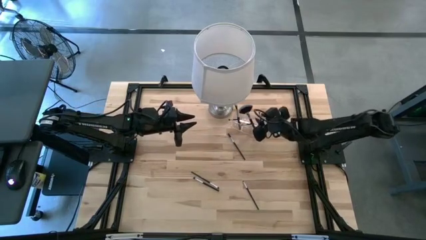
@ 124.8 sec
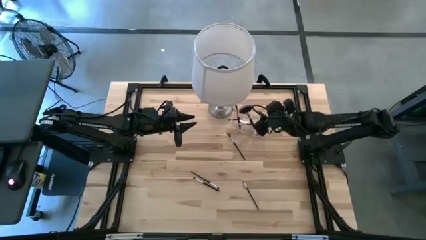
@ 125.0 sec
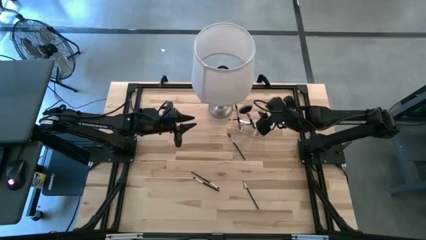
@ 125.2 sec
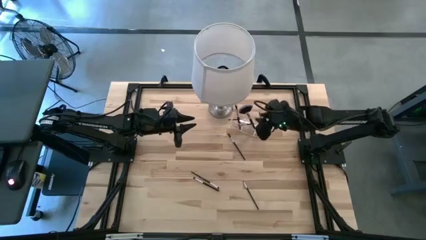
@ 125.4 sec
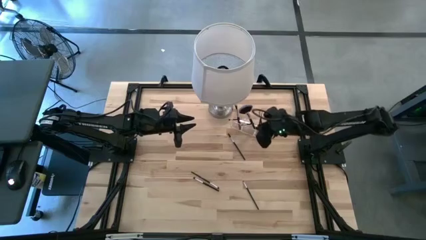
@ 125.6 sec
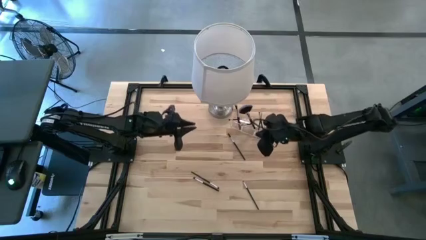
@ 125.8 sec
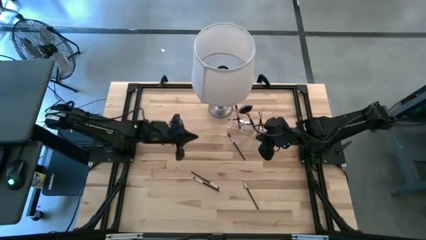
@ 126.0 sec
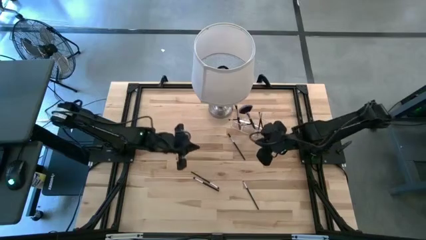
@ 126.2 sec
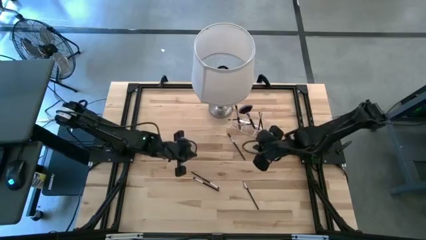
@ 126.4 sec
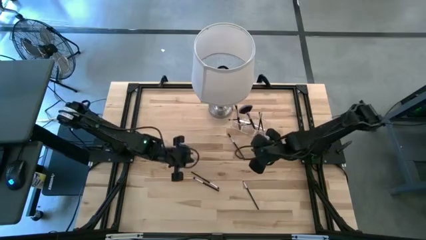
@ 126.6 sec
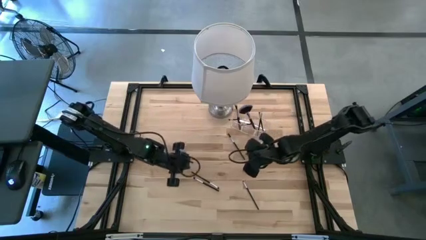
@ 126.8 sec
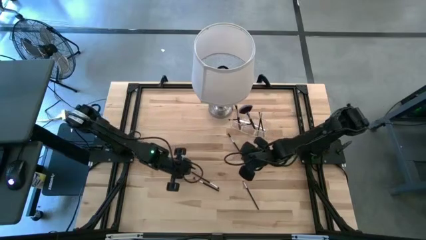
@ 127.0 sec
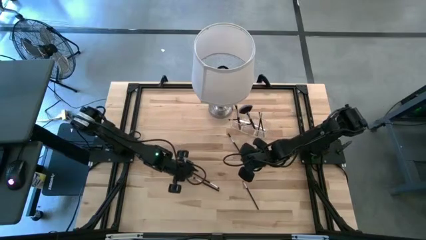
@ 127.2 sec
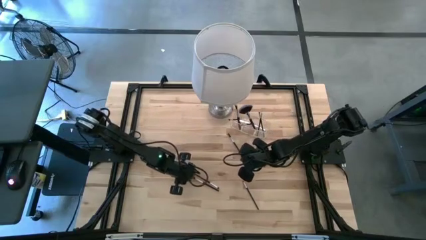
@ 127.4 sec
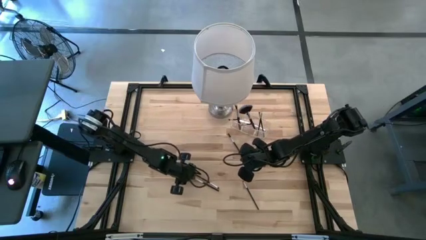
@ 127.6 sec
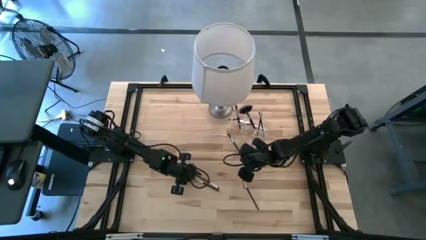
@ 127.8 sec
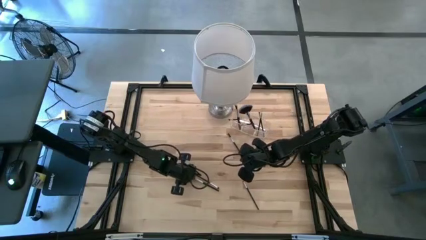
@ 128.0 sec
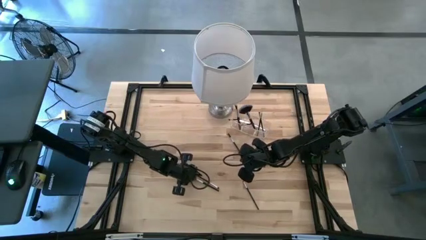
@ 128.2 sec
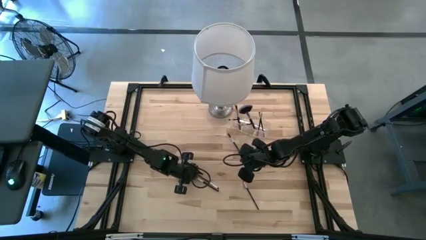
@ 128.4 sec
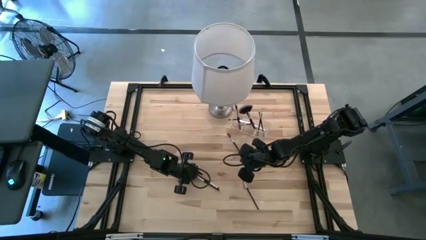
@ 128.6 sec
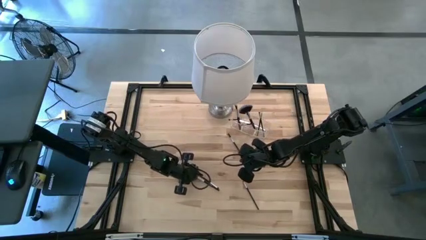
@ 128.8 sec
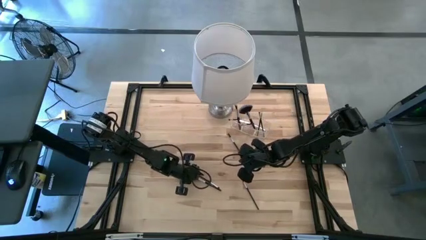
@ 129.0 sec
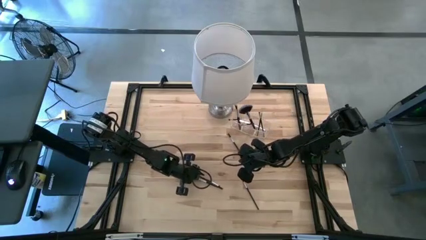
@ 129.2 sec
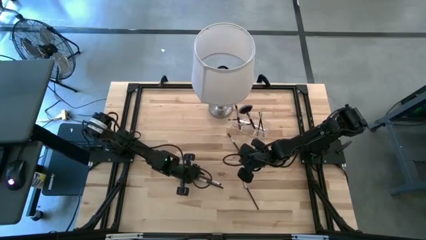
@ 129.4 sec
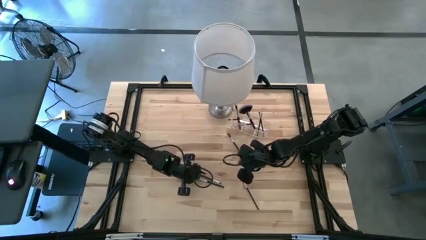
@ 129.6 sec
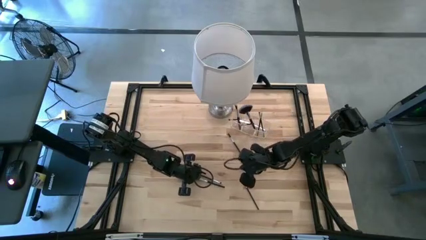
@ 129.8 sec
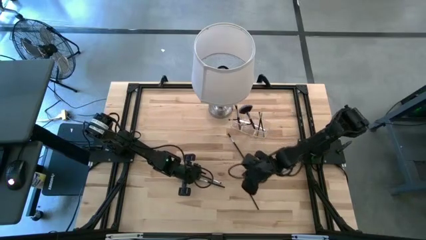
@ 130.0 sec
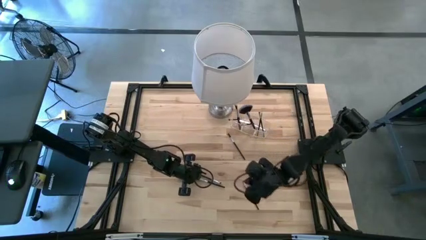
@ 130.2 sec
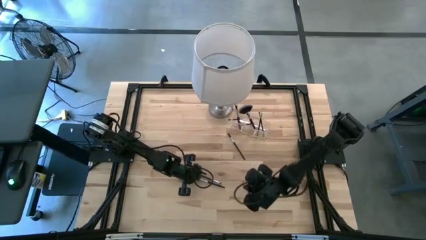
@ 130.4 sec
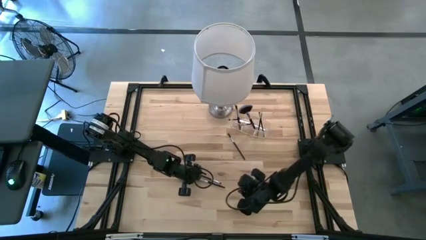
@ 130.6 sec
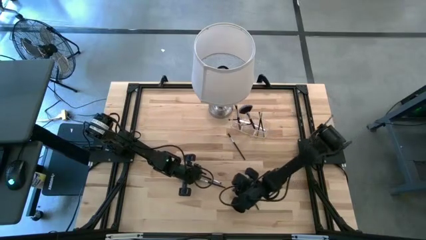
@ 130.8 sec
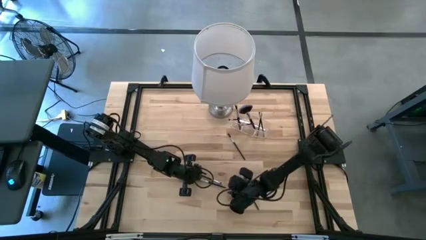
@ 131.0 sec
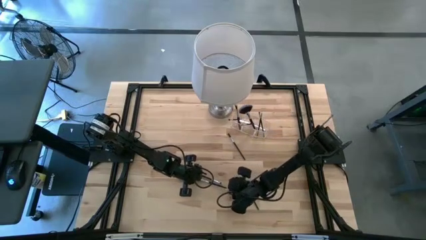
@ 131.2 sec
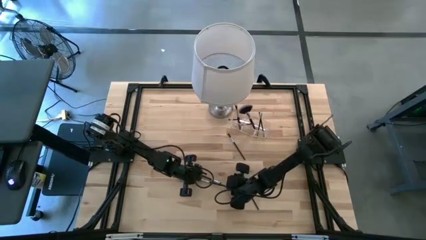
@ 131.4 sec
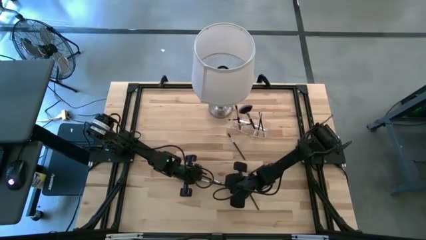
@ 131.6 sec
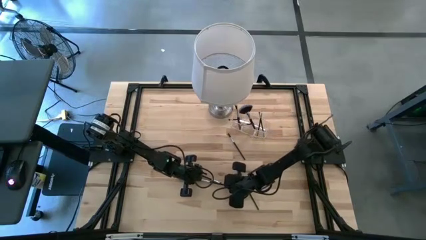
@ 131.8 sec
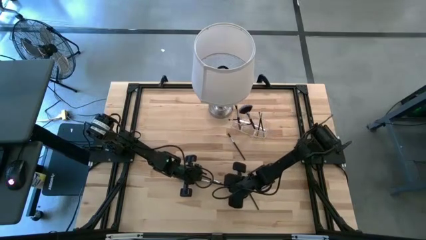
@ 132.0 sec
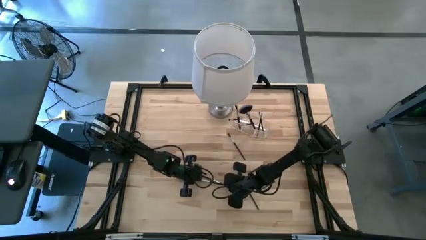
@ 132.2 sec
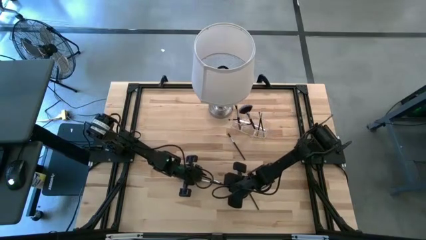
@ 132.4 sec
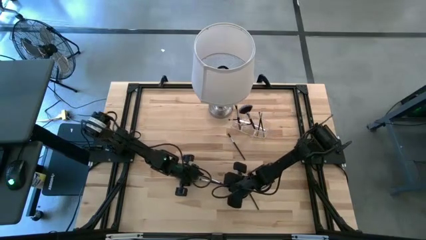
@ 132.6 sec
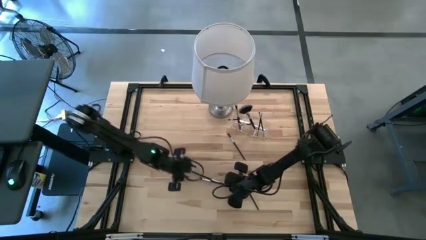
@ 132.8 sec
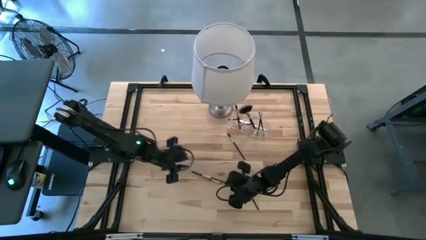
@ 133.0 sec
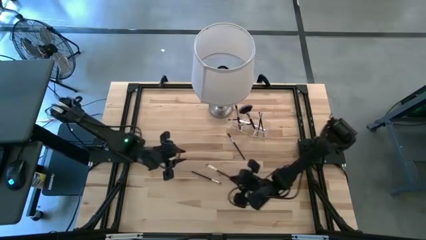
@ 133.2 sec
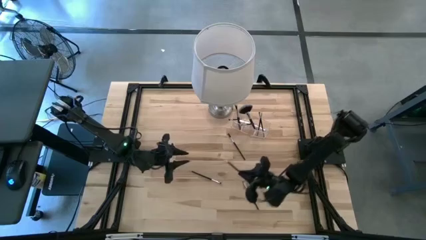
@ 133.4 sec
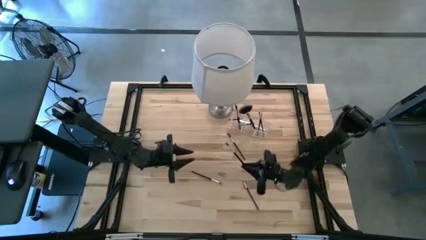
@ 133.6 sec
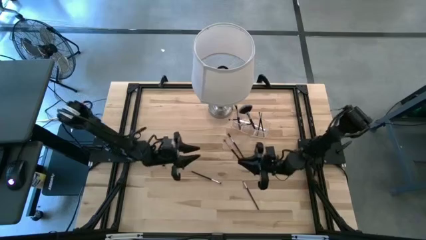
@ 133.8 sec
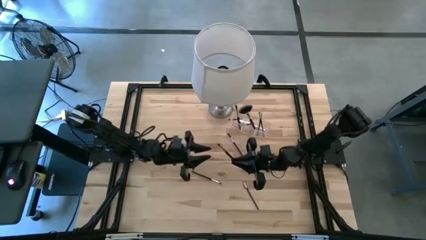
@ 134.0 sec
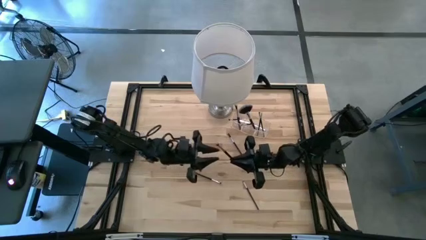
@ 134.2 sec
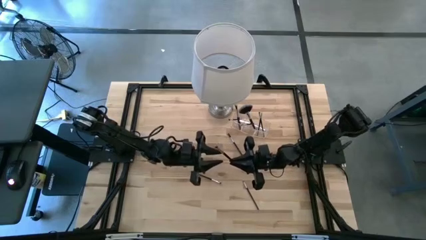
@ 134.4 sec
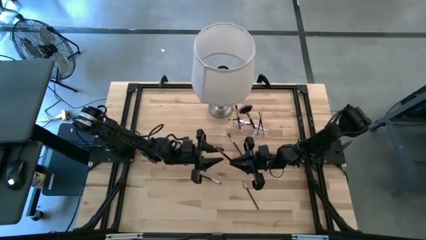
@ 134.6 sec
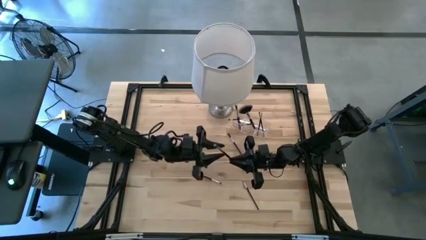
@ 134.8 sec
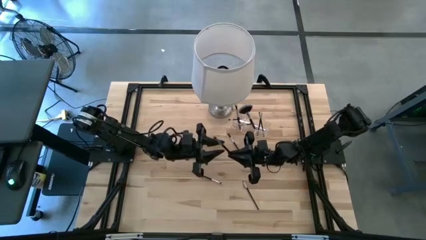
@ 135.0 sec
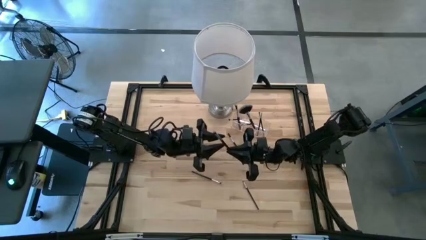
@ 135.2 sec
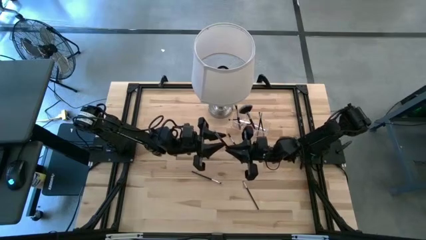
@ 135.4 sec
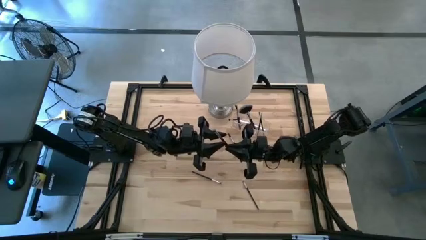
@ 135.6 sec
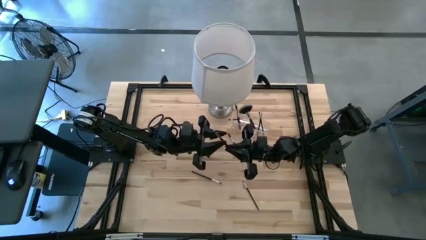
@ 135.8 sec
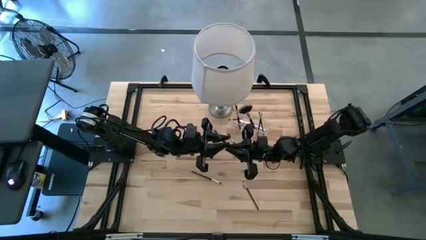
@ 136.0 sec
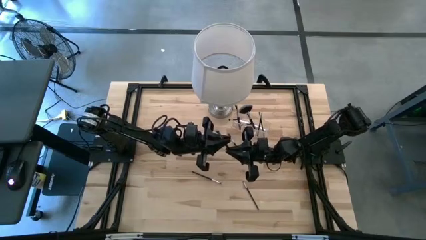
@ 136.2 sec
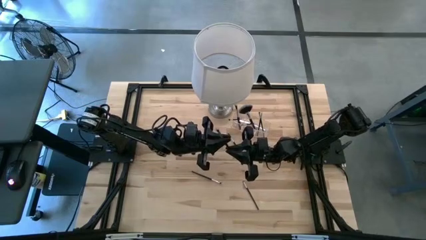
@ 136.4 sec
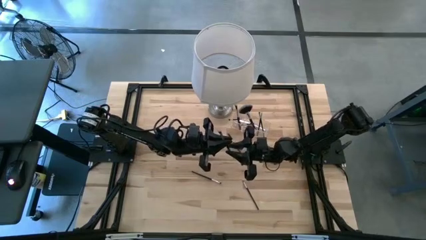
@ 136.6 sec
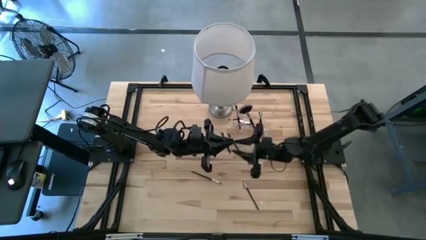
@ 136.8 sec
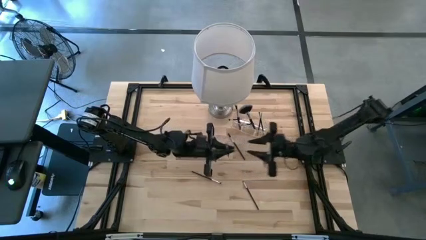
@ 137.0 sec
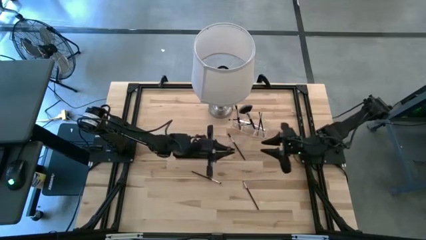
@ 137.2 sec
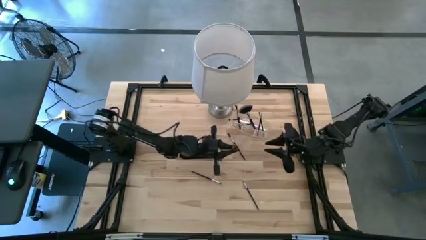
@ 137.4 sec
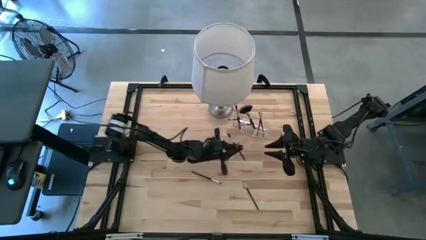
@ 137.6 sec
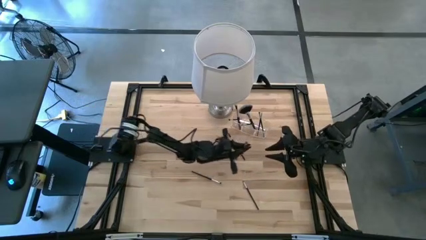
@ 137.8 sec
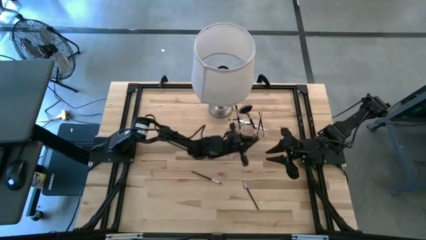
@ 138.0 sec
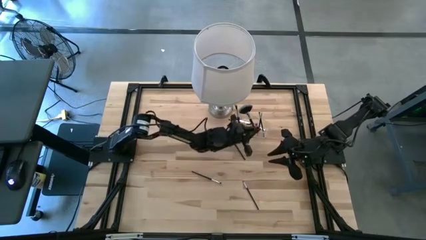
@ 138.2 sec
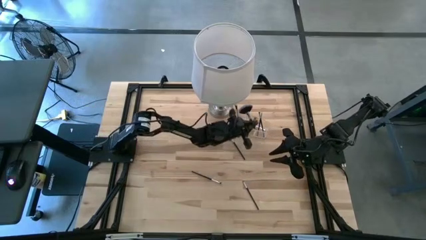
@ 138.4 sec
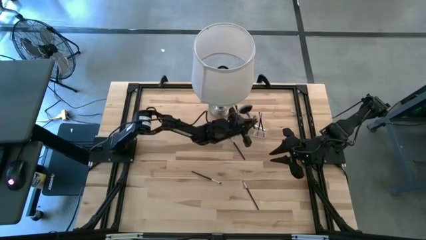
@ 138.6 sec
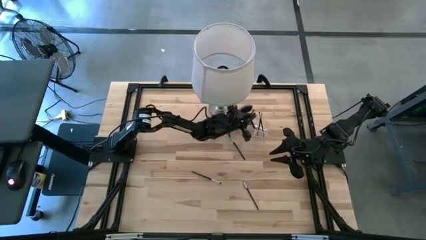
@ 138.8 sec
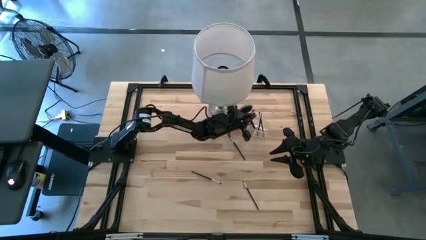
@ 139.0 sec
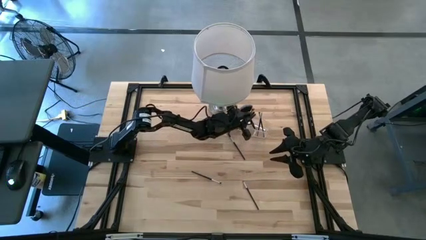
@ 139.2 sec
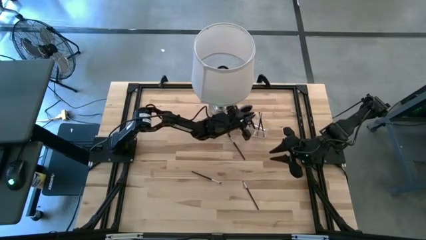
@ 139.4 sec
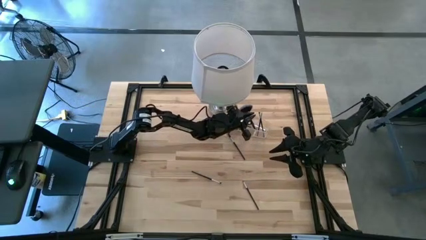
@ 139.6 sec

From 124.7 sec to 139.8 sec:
Task: Put items in baskets/containers
Put the eyeshadow brush into the transparent organizer

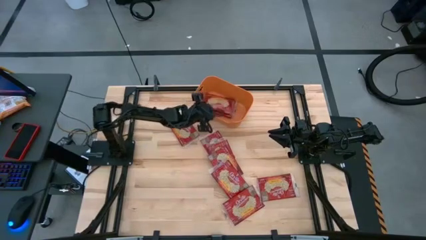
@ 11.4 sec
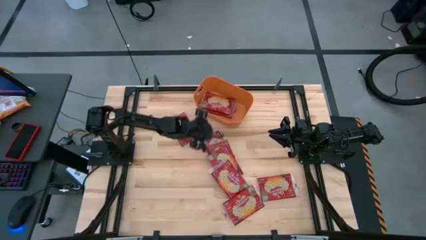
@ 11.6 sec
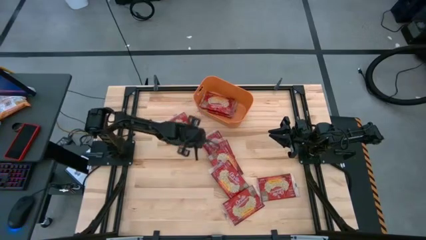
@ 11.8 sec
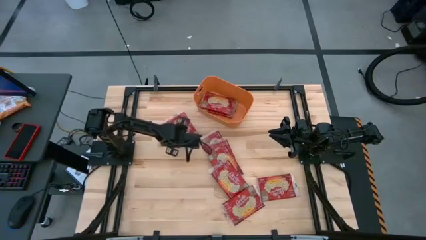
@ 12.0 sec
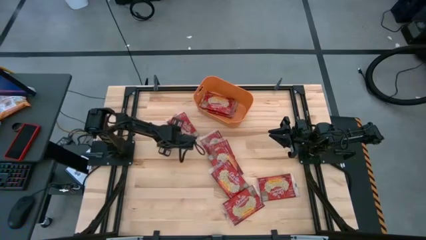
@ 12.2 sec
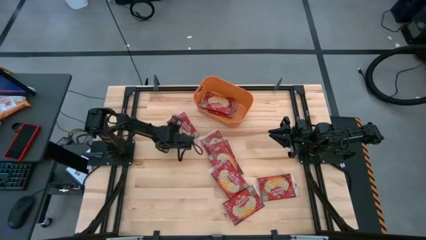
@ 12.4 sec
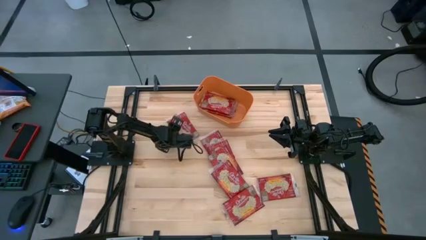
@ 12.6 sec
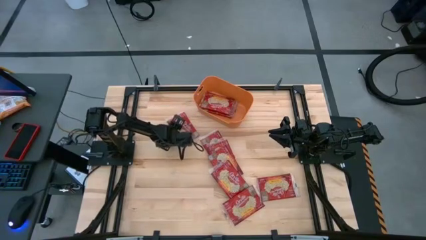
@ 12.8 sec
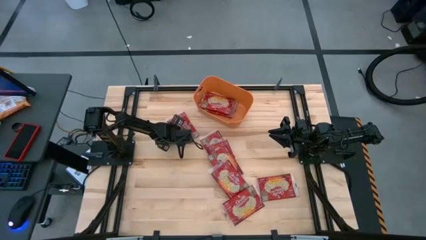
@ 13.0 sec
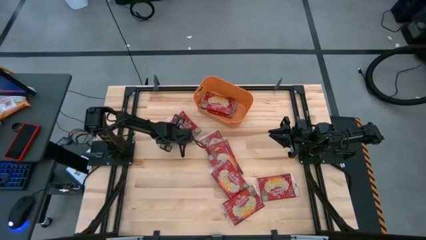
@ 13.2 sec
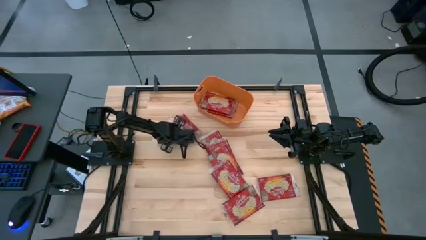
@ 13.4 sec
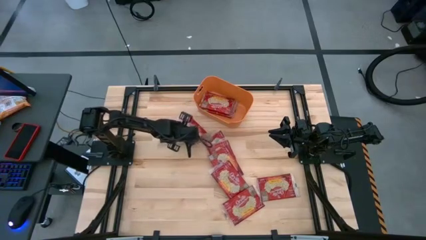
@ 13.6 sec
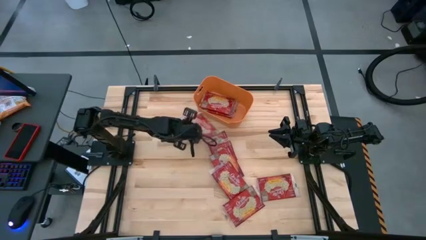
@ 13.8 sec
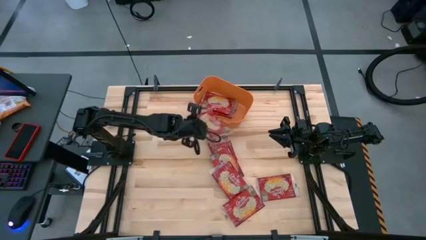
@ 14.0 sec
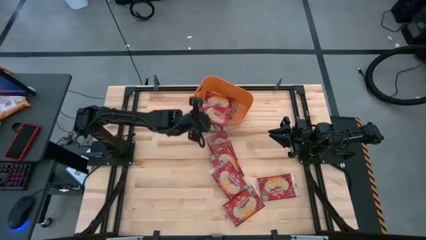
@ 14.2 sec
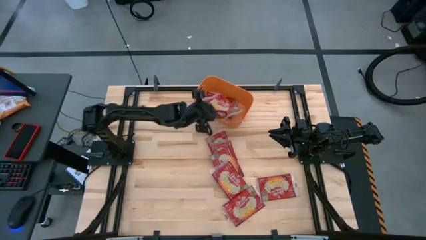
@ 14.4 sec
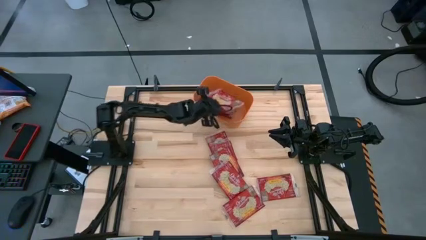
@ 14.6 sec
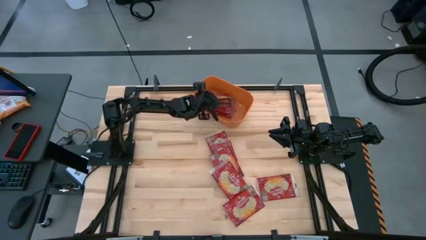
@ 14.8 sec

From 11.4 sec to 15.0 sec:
Task: Sort popcorn bags into baskets
Put the red popcorn pack into the orange bin
